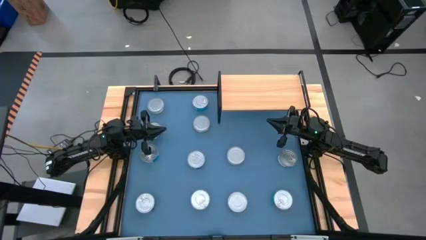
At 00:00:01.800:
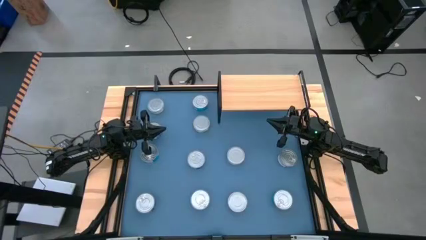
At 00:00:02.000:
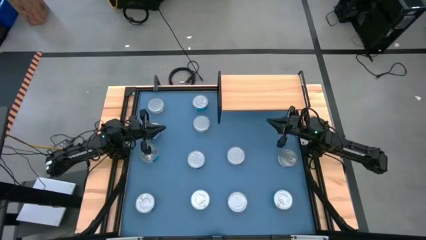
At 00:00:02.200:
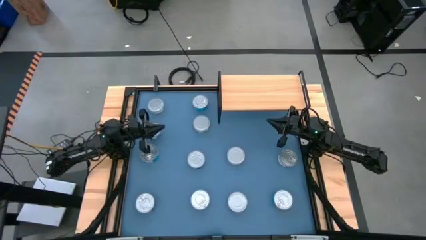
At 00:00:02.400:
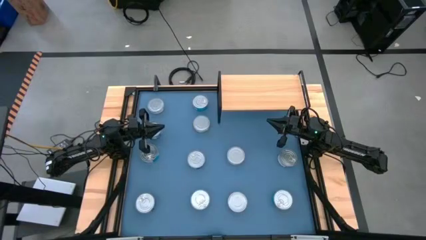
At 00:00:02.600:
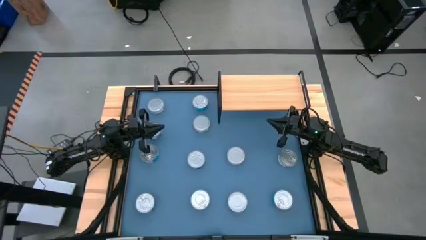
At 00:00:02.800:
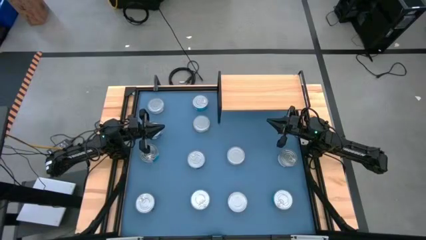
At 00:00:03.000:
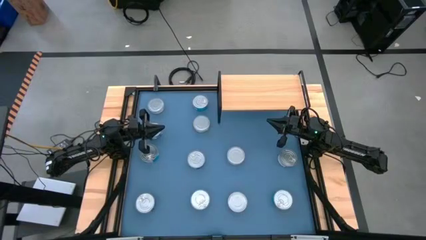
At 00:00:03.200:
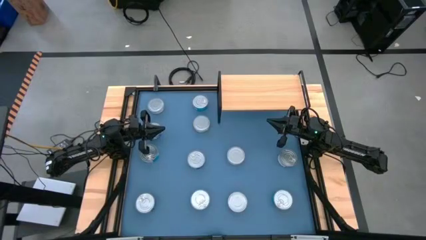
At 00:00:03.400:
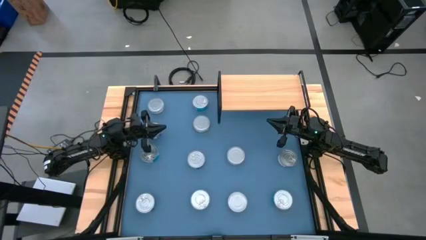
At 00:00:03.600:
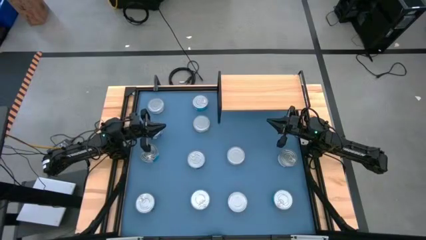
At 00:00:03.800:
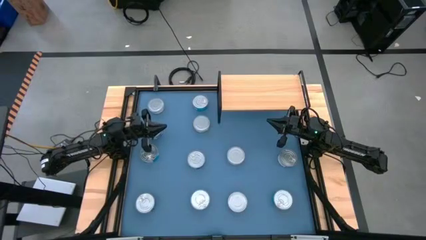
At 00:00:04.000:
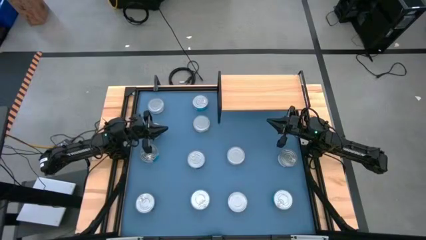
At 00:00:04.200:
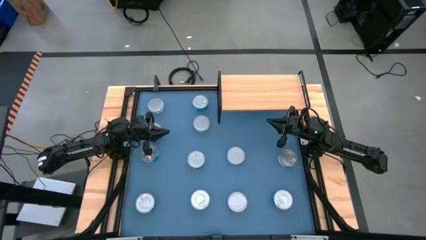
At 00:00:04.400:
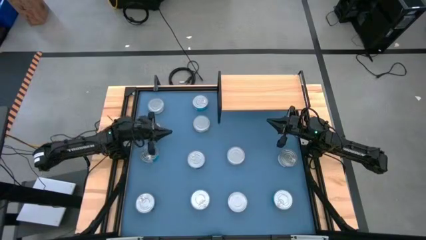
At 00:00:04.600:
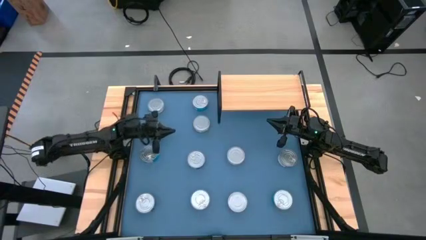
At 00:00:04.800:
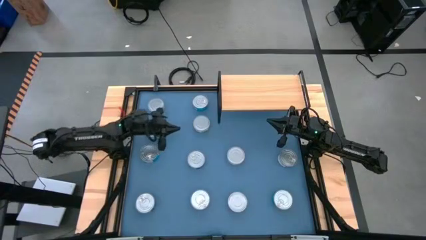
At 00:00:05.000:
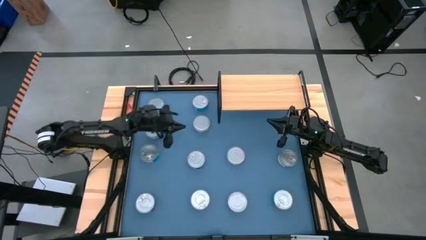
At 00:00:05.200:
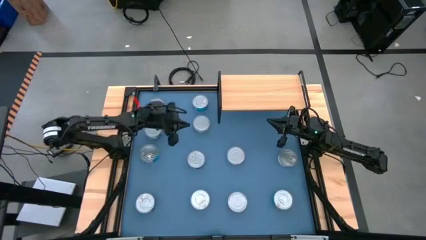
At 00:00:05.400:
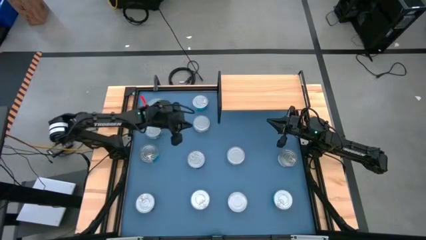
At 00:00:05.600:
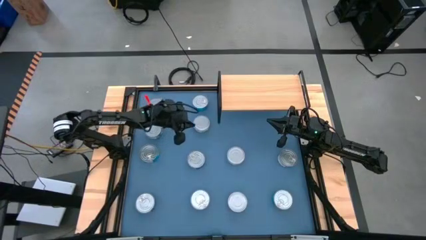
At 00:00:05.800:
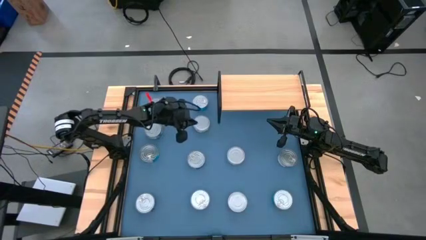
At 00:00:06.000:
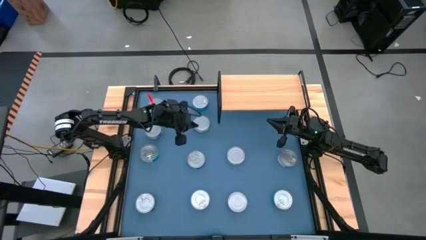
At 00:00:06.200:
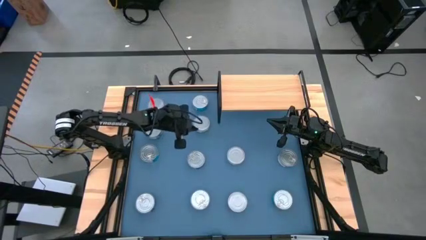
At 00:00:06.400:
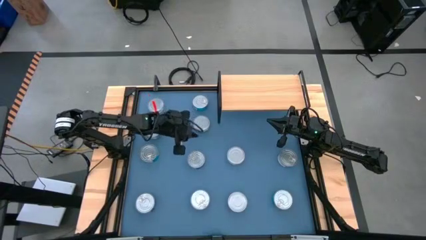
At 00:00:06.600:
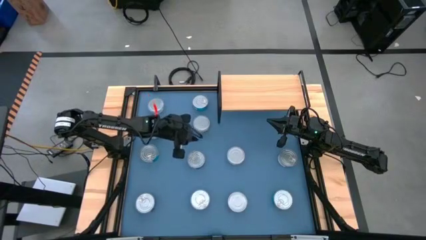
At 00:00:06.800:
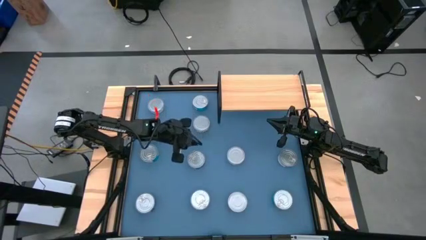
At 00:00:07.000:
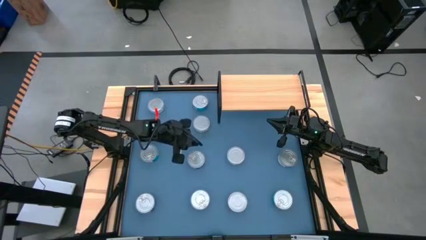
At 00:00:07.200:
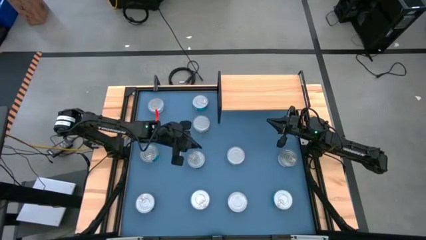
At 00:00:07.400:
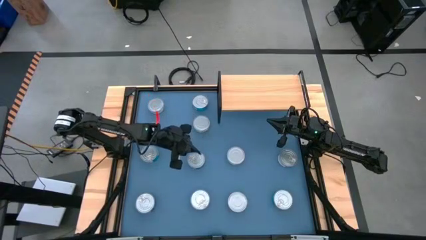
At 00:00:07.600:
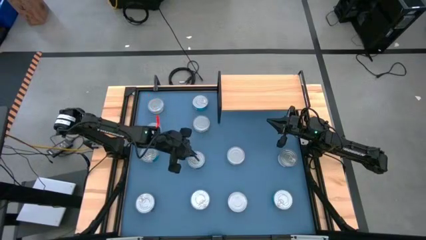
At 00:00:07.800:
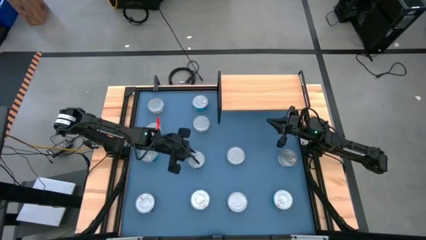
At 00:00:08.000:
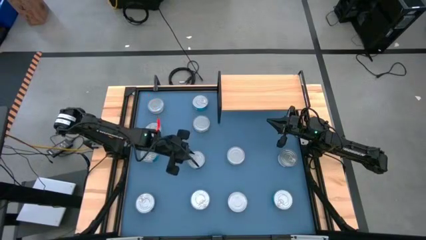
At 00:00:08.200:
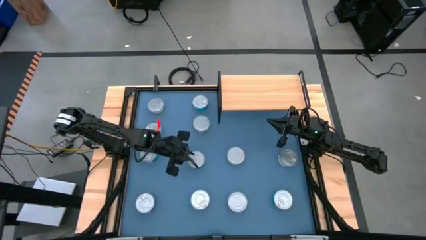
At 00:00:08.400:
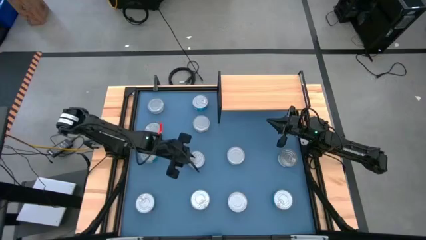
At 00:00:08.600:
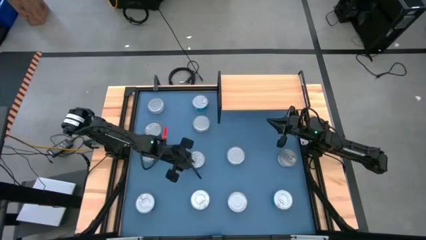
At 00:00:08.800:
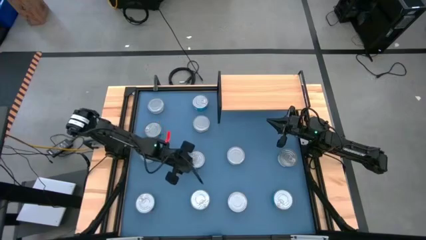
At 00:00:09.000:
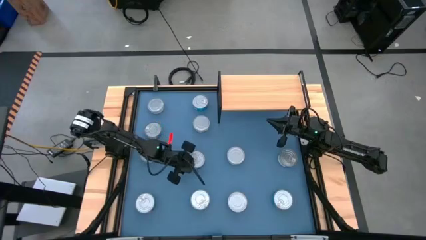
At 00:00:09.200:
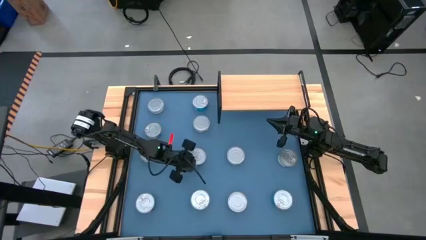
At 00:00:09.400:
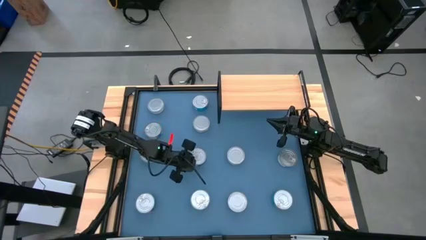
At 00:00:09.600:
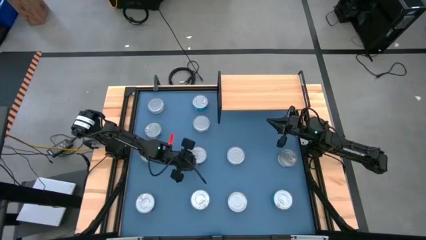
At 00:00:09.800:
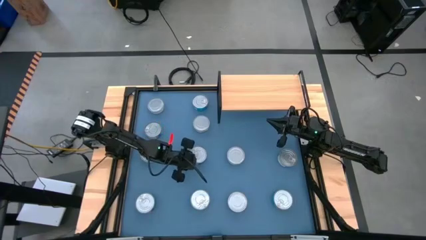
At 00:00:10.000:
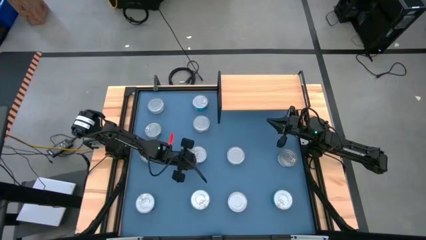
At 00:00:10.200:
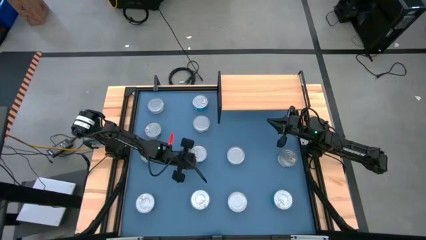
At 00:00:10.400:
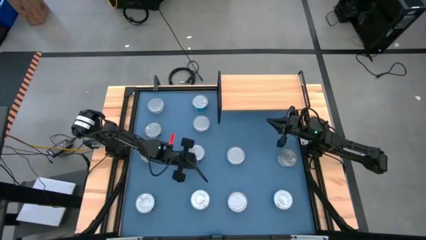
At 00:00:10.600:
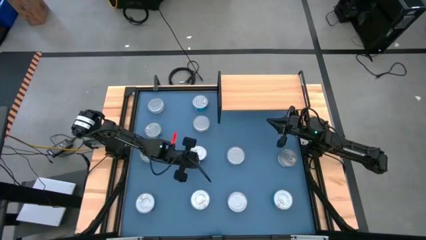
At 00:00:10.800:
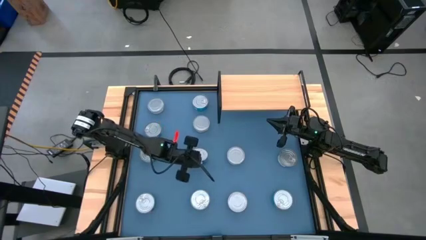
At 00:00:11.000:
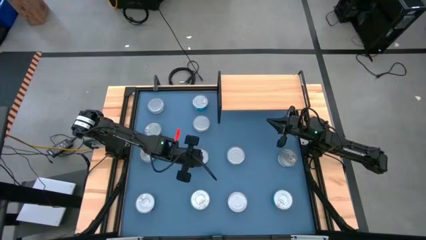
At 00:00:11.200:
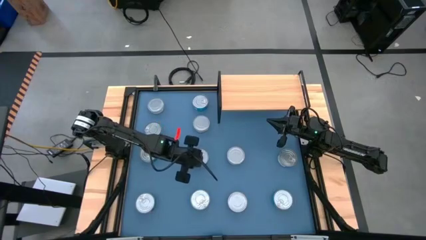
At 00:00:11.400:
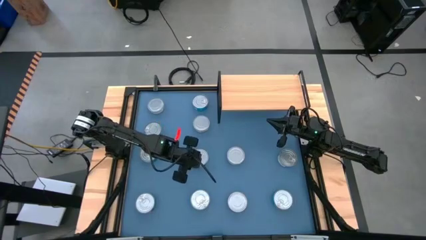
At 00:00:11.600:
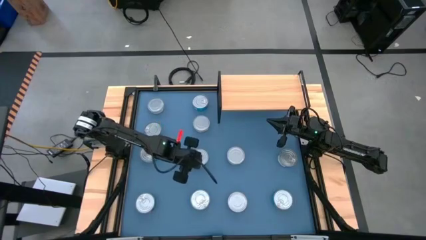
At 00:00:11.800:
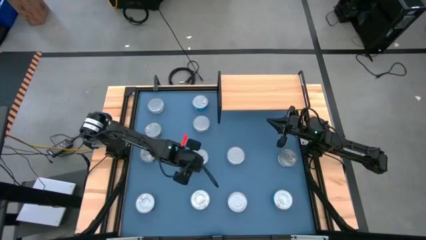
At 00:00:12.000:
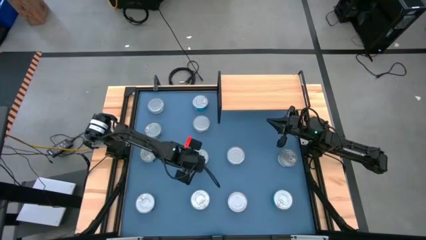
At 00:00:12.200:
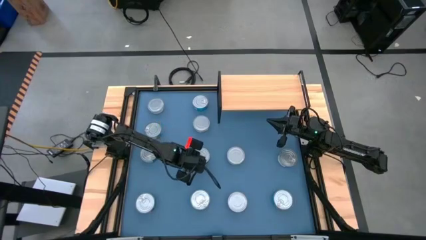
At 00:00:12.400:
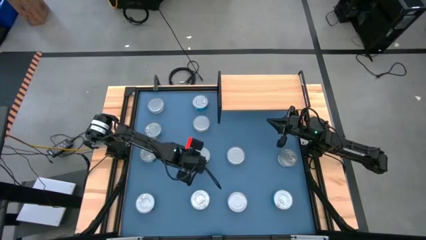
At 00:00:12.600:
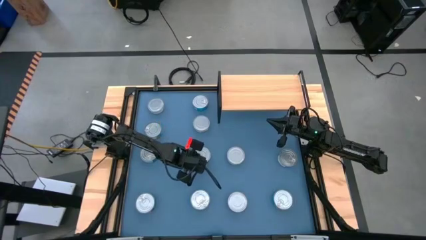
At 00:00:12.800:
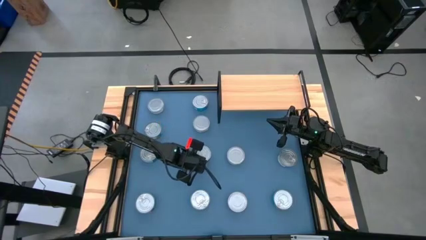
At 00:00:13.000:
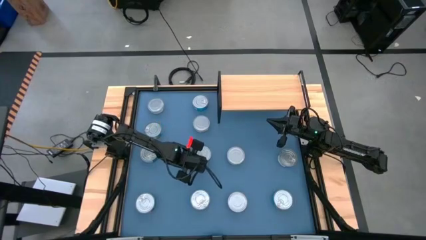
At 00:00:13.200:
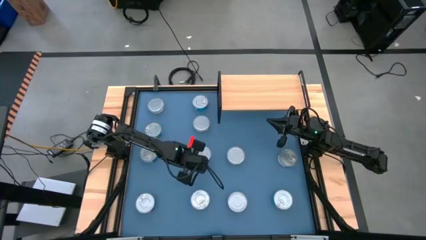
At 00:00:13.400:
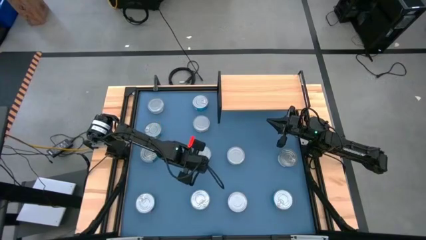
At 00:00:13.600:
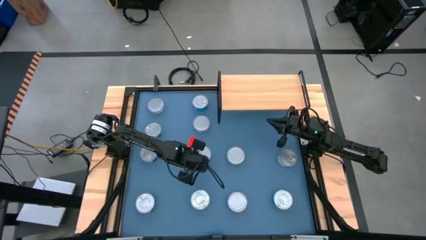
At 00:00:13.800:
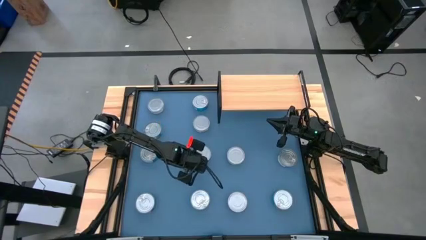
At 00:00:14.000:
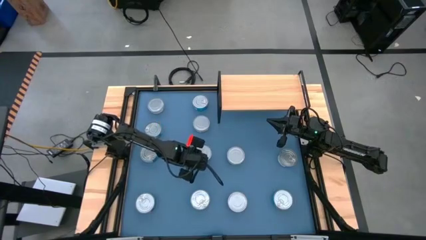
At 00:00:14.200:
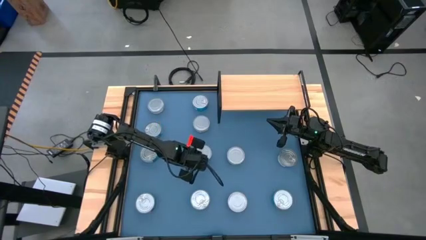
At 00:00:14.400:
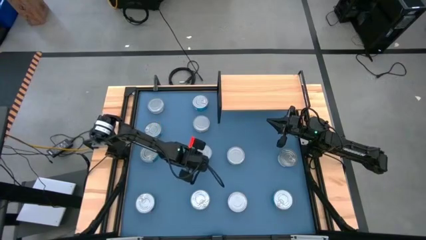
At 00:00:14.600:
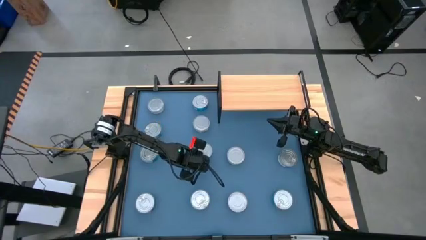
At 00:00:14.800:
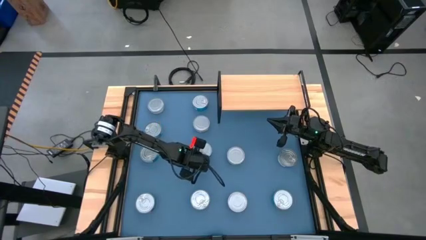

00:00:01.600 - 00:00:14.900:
Task: Stack canned seafood by type on shelf
Put the middle blue tuna can on the shelf
